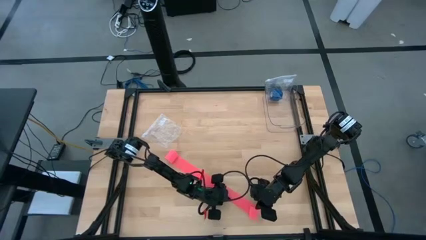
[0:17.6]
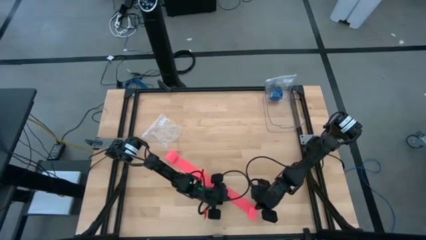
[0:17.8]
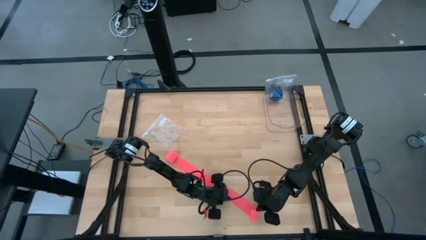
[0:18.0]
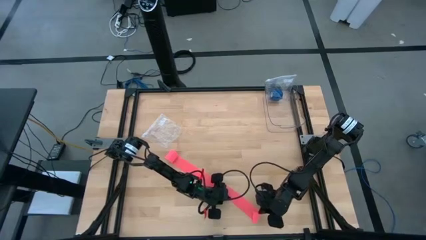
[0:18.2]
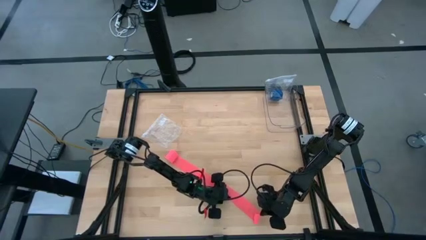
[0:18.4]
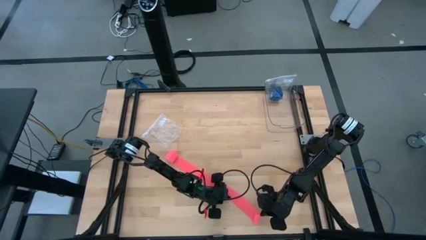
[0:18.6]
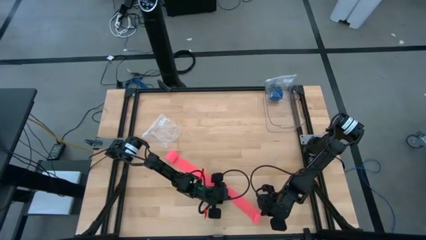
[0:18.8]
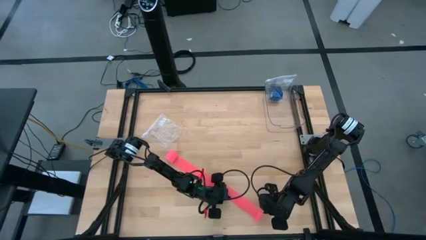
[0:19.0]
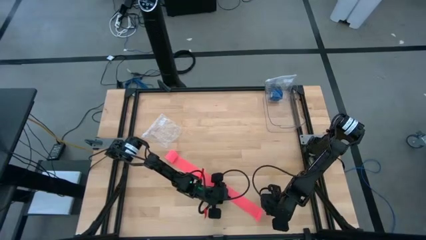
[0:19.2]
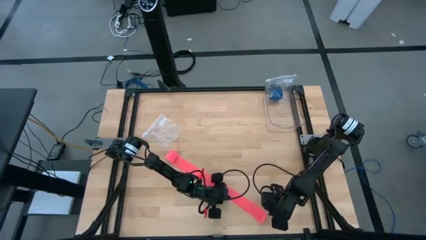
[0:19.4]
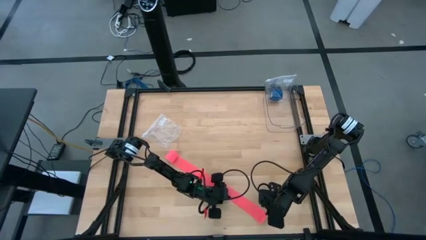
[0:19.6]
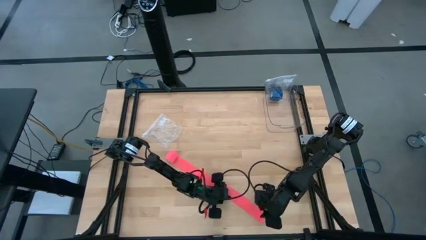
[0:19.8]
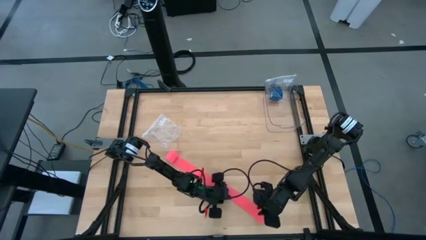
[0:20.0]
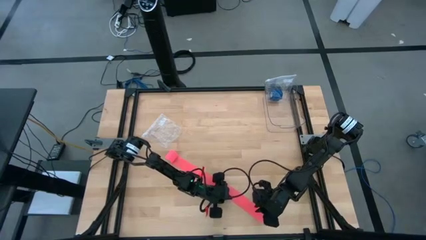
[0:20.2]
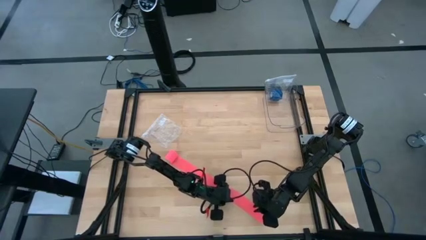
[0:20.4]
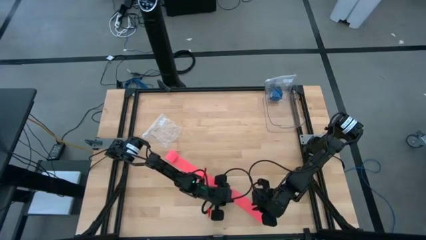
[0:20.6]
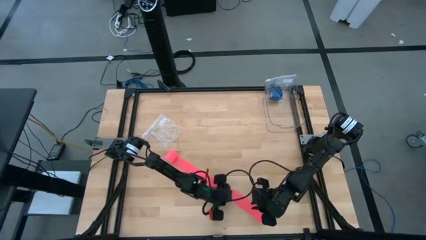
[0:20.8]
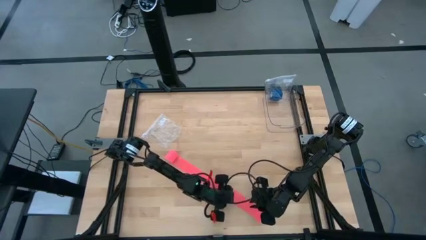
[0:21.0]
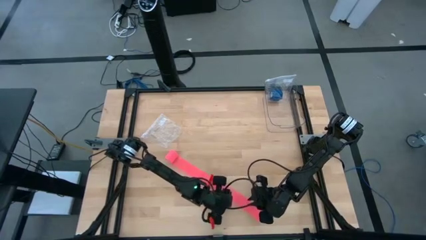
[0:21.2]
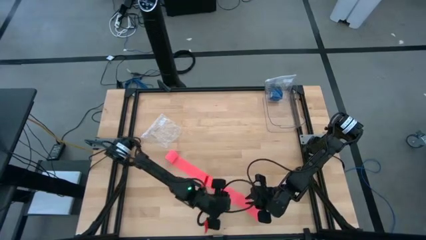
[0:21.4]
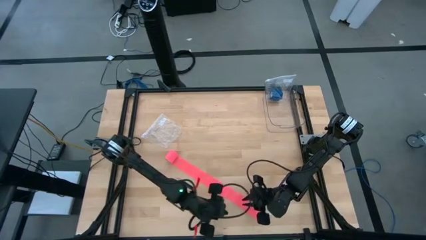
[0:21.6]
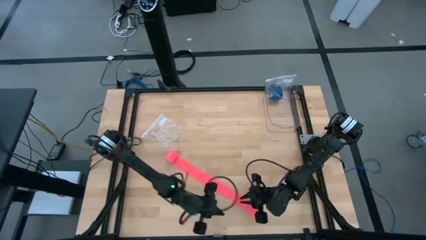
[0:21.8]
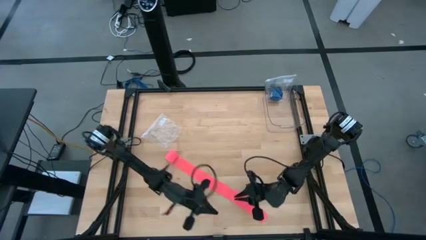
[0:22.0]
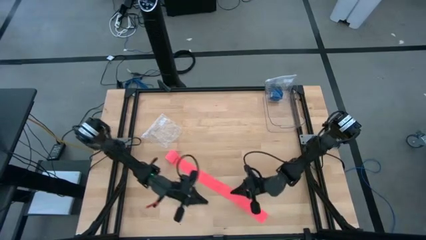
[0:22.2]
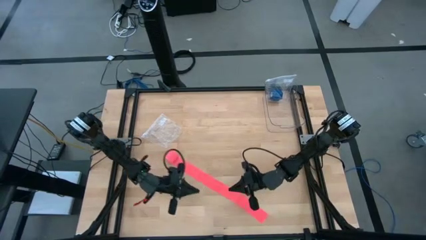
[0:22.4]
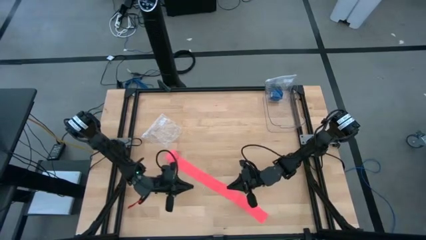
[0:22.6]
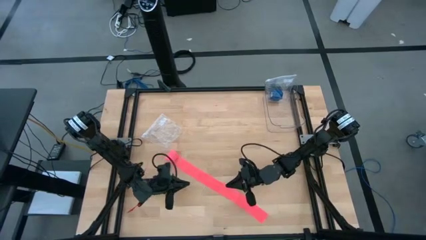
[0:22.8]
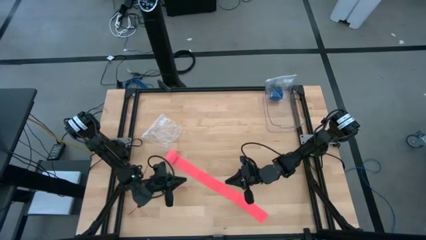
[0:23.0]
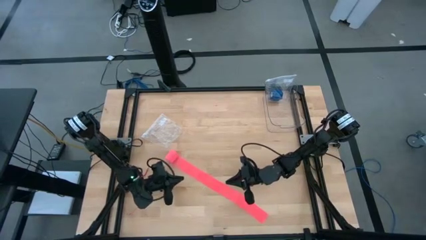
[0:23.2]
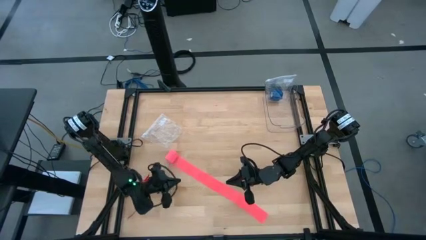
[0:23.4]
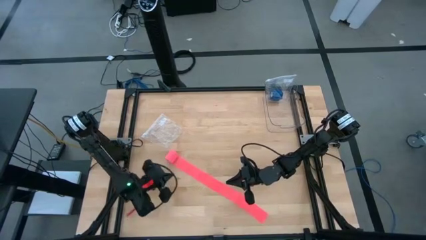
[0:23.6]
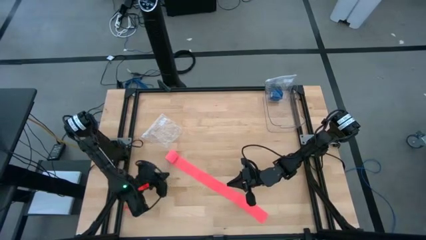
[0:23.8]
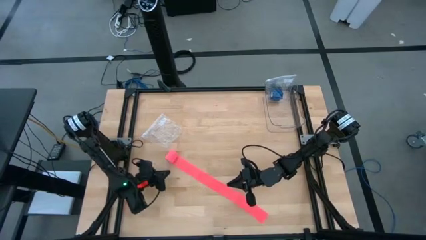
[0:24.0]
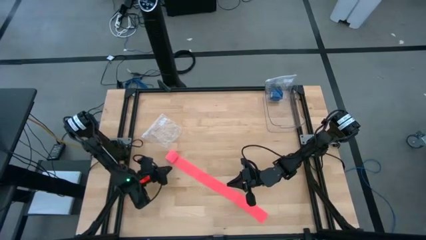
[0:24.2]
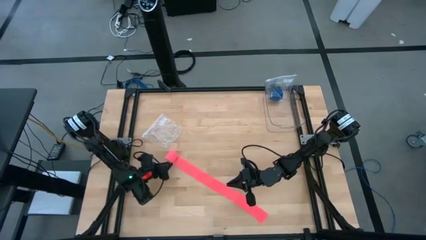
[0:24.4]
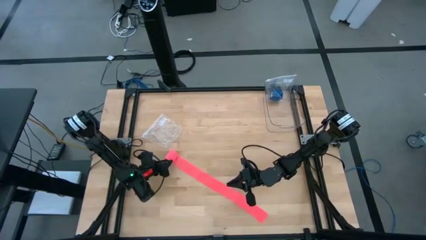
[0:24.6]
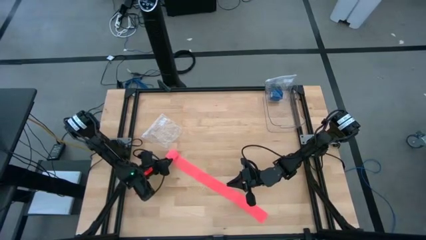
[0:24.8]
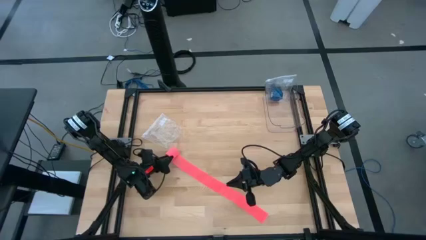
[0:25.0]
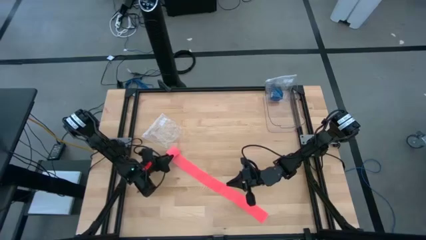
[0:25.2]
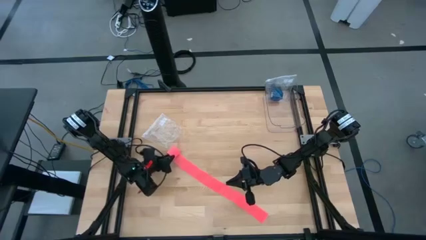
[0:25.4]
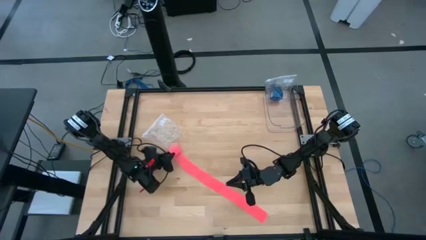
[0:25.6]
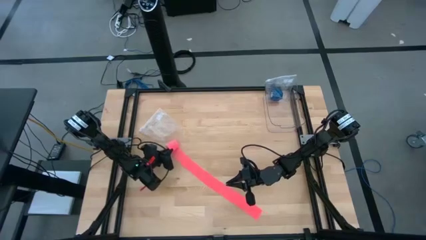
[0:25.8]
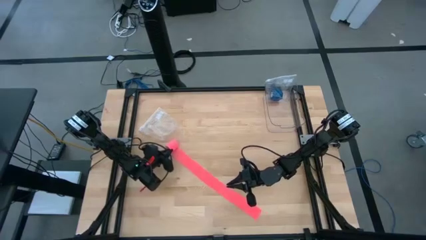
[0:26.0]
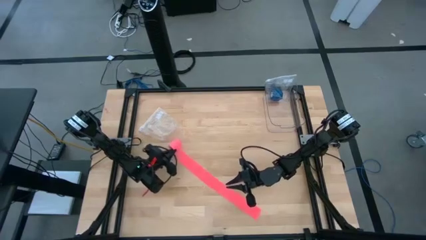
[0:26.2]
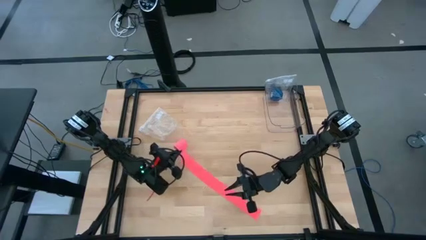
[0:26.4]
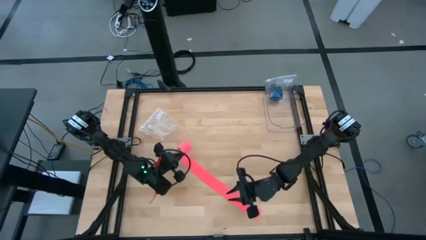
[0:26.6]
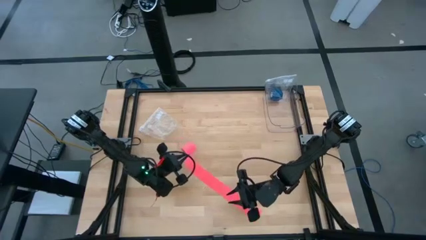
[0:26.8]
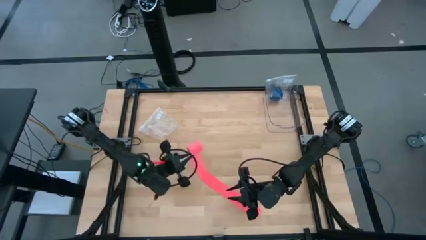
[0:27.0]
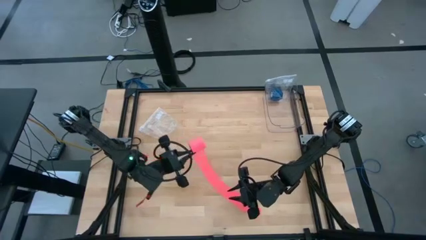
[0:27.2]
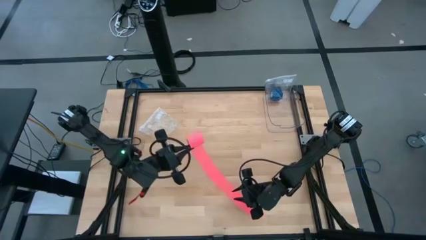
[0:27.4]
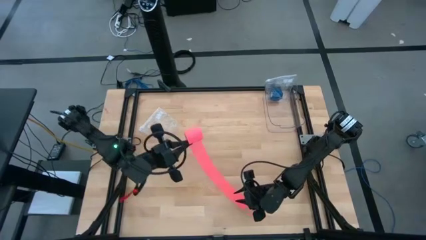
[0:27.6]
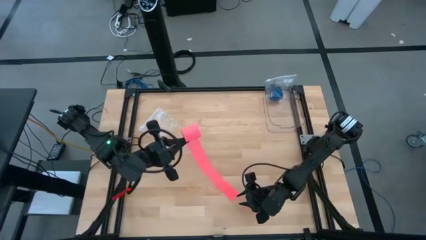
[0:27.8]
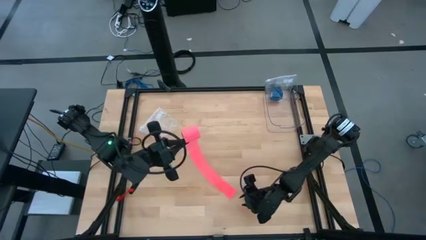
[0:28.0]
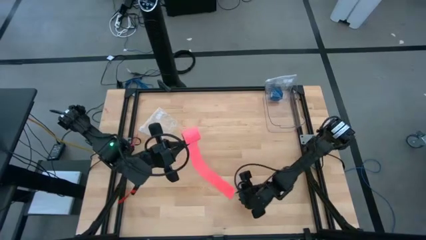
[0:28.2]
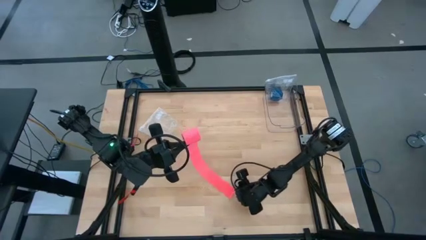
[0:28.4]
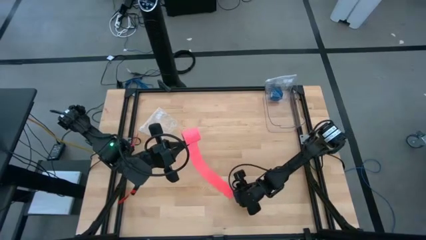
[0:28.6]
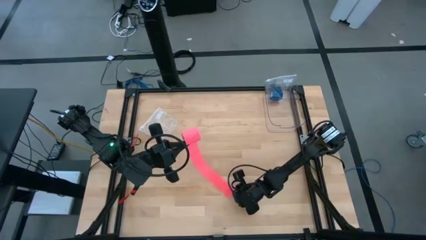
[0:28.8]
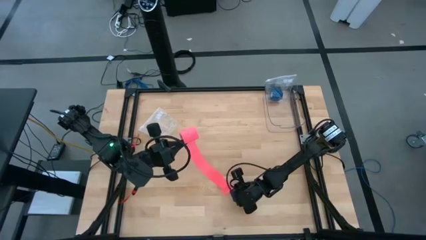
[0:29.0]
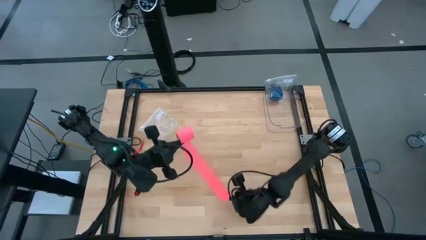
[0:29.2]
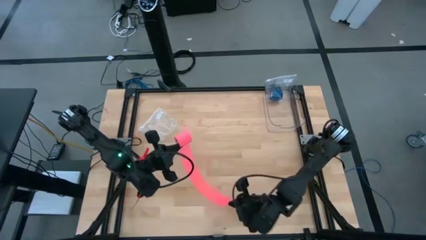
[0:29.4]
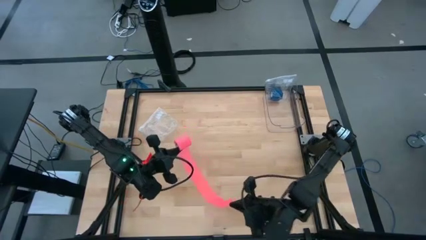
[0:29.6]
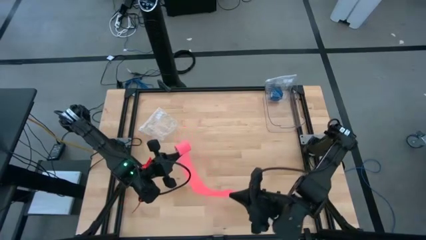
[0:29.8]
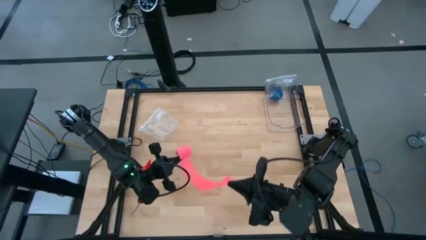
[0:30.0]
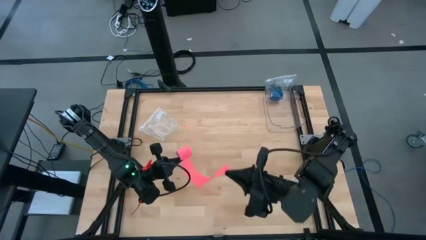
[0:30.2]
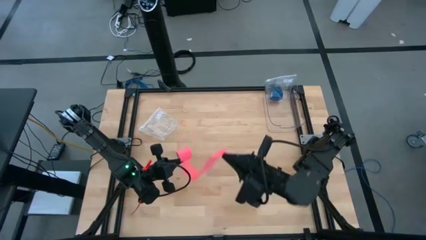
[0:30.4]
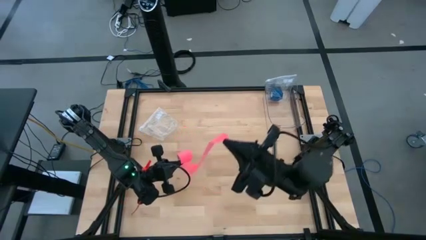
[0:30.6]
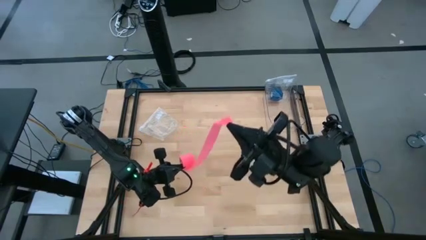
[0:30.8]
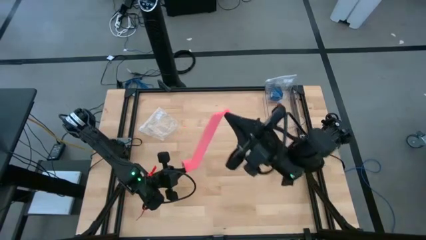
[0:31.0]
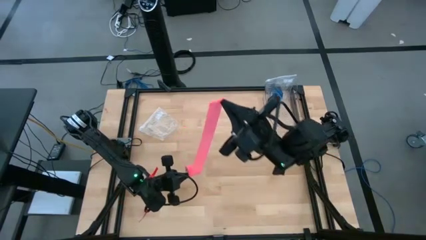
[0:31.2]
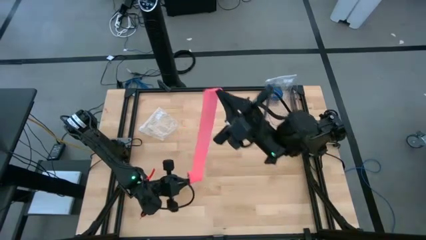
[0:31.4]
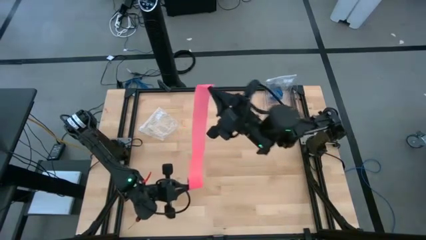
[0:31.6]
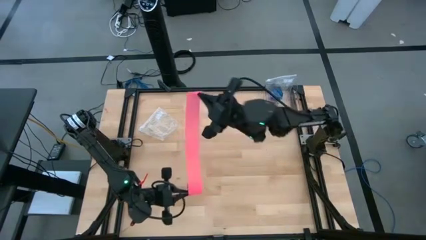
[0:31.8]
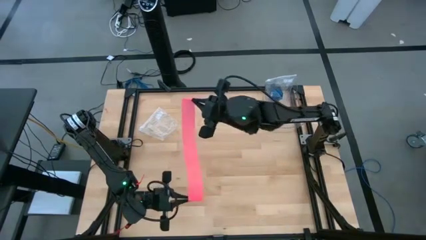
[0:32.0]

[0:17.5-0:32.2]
Task: Roll bandage
Roll the pink bandage
